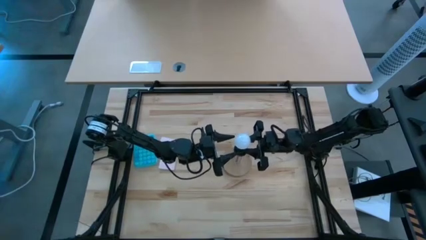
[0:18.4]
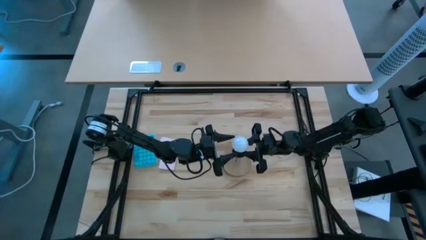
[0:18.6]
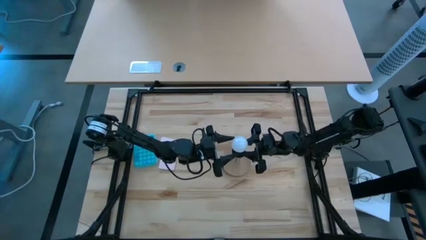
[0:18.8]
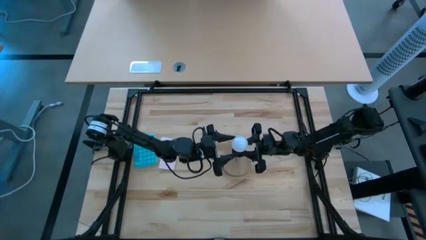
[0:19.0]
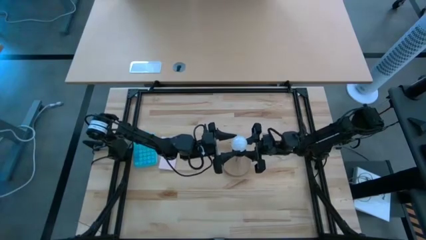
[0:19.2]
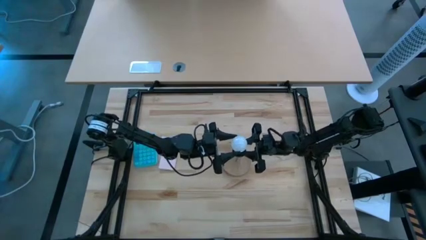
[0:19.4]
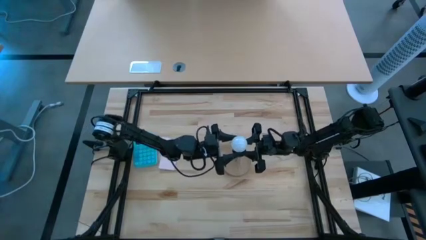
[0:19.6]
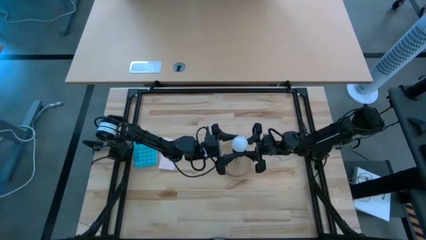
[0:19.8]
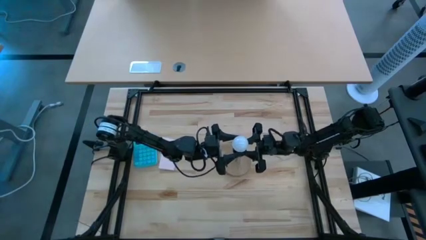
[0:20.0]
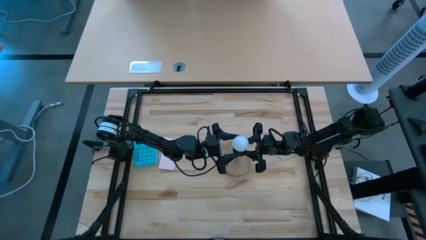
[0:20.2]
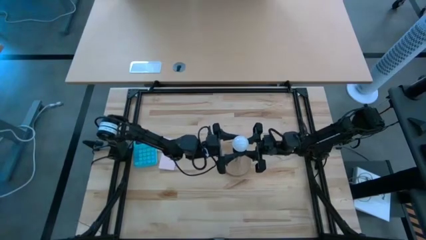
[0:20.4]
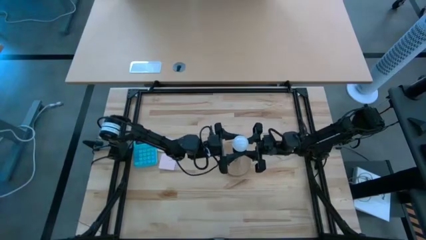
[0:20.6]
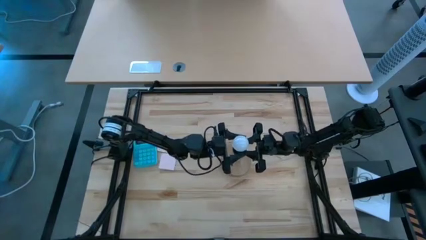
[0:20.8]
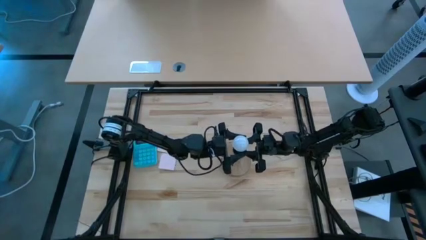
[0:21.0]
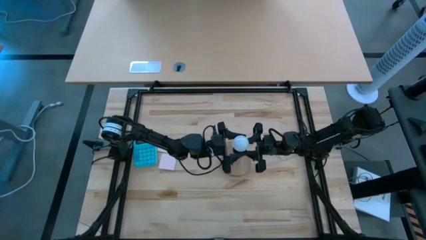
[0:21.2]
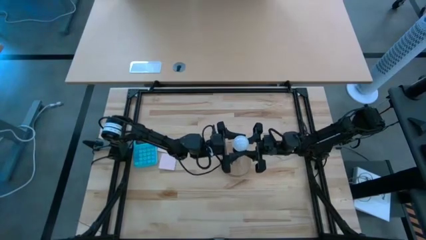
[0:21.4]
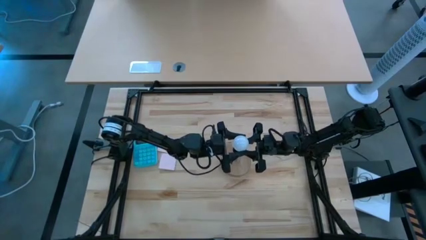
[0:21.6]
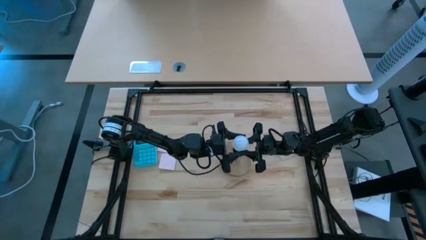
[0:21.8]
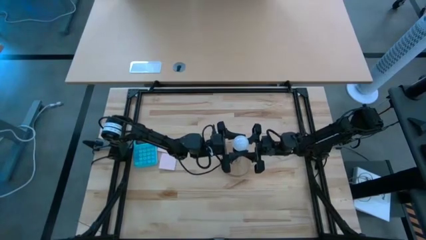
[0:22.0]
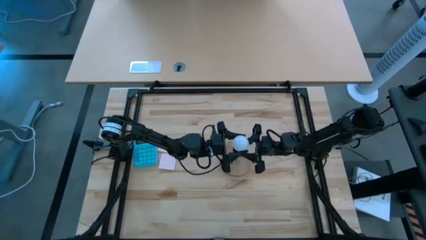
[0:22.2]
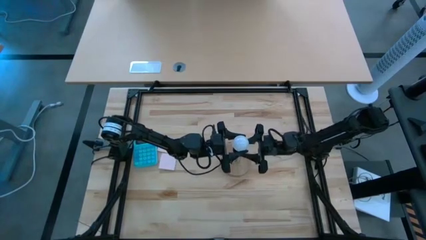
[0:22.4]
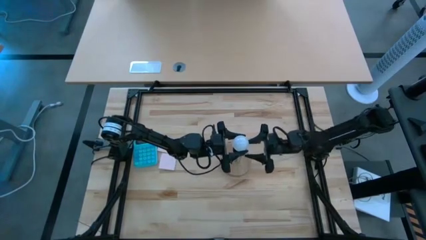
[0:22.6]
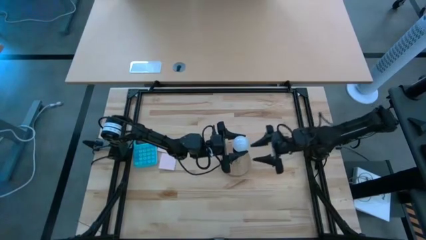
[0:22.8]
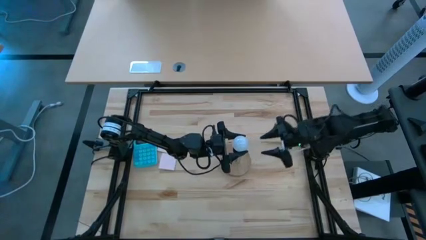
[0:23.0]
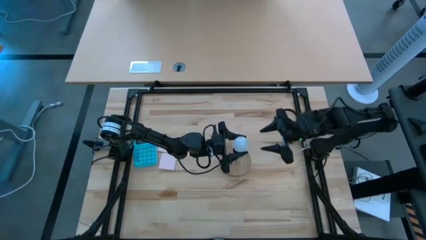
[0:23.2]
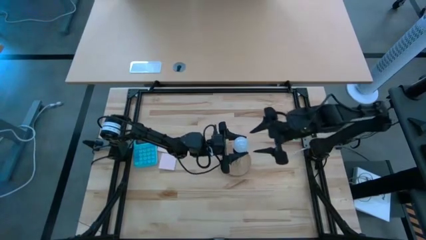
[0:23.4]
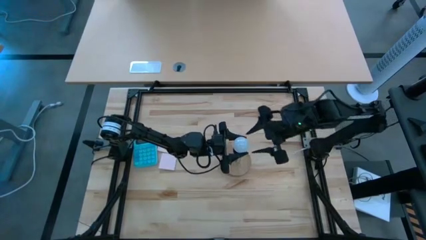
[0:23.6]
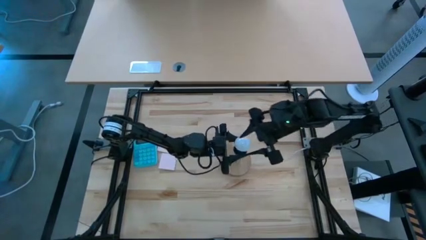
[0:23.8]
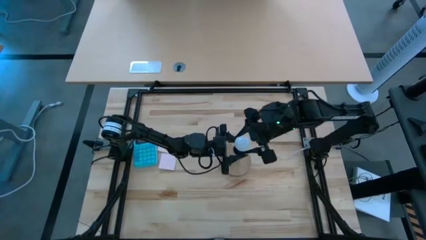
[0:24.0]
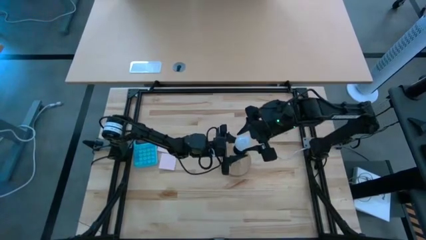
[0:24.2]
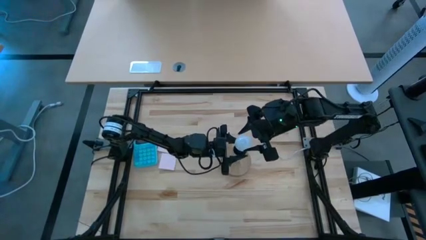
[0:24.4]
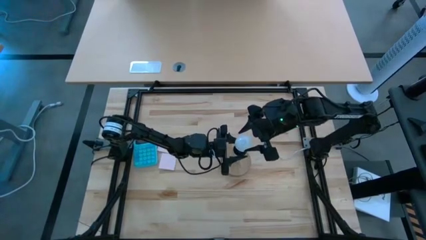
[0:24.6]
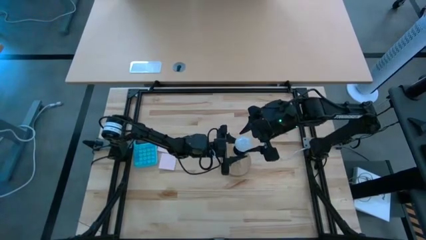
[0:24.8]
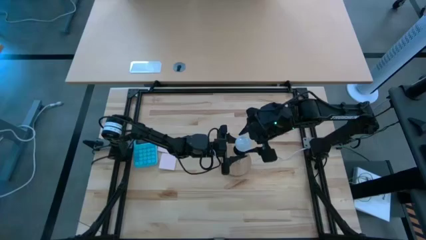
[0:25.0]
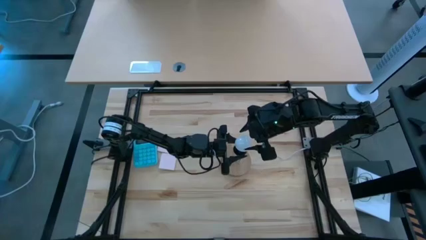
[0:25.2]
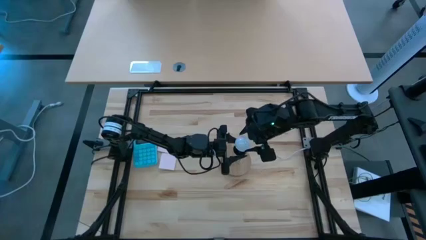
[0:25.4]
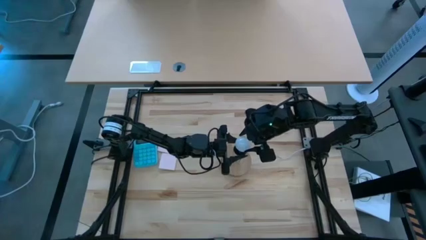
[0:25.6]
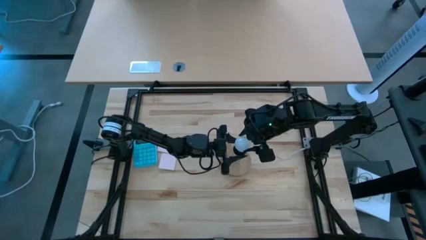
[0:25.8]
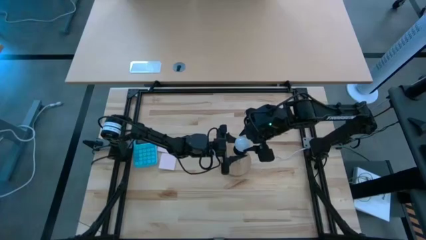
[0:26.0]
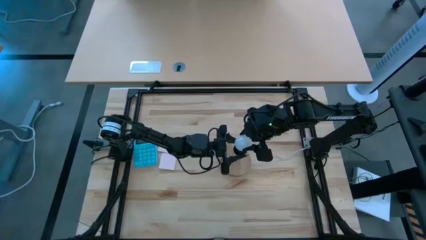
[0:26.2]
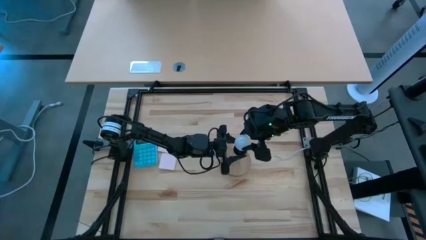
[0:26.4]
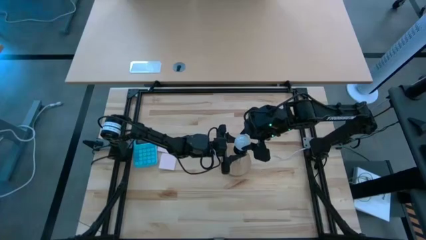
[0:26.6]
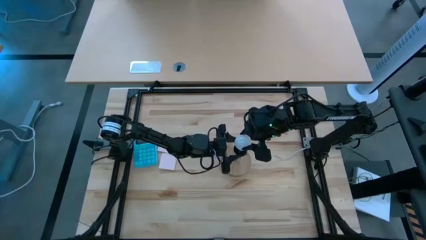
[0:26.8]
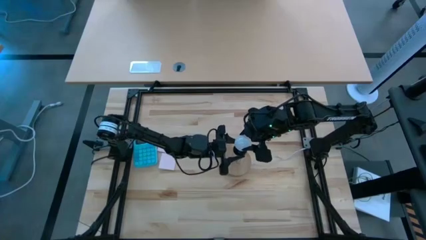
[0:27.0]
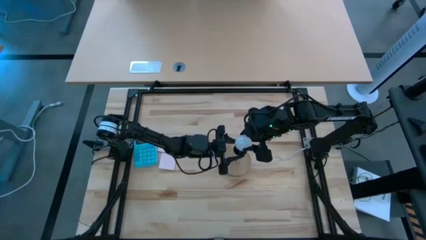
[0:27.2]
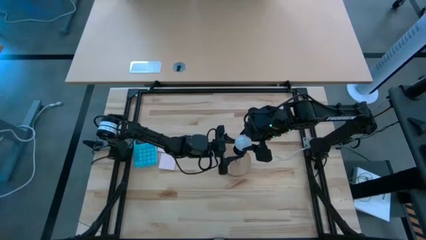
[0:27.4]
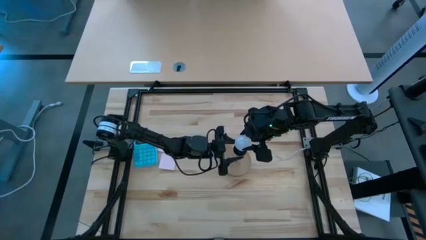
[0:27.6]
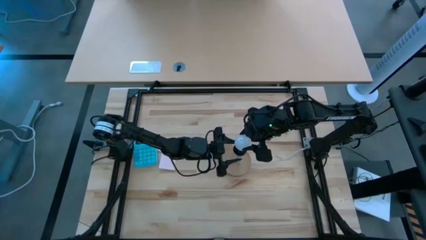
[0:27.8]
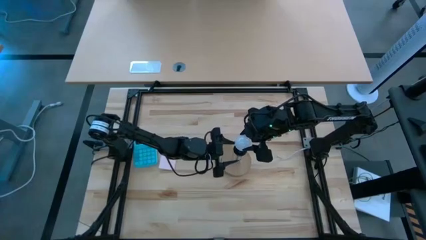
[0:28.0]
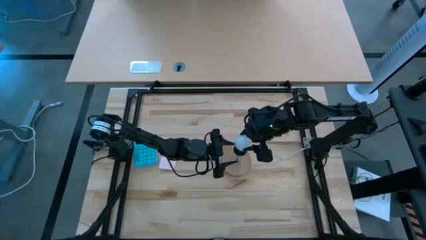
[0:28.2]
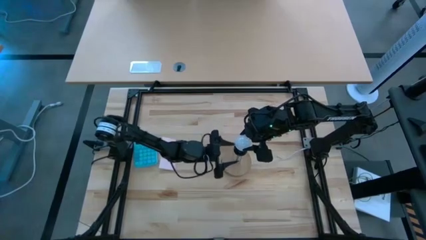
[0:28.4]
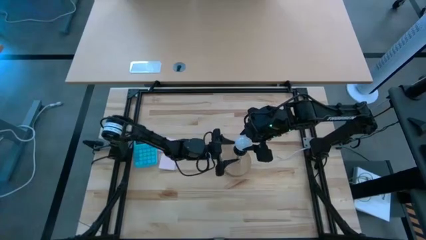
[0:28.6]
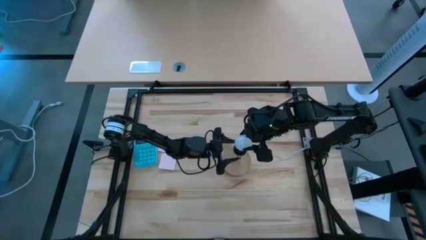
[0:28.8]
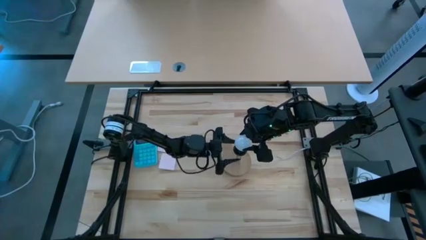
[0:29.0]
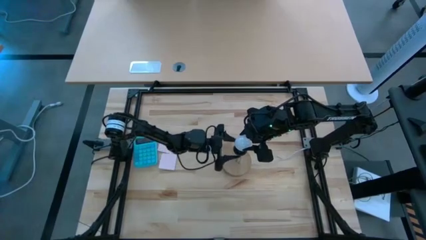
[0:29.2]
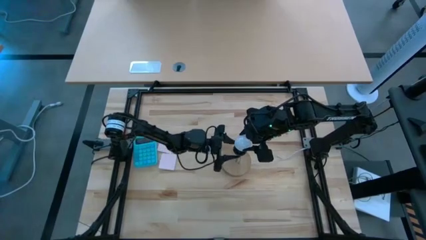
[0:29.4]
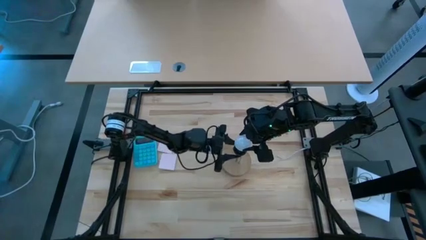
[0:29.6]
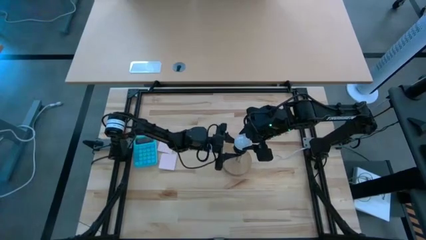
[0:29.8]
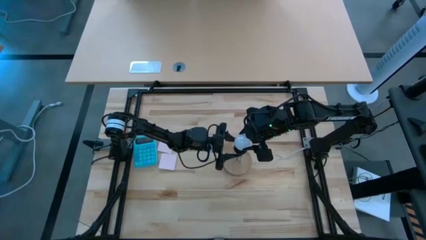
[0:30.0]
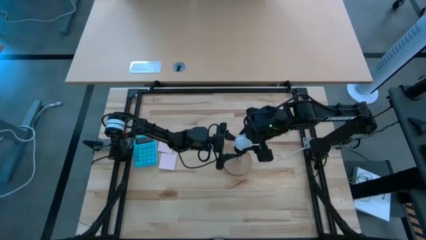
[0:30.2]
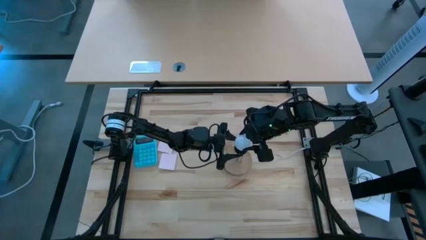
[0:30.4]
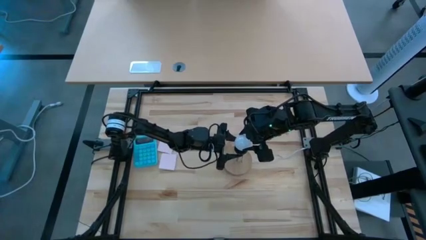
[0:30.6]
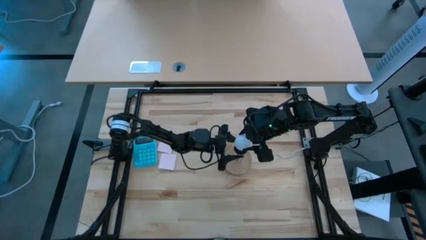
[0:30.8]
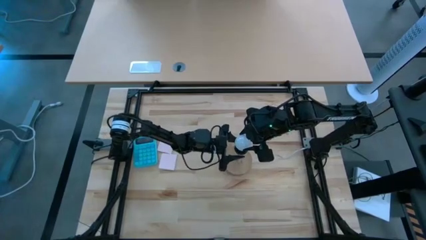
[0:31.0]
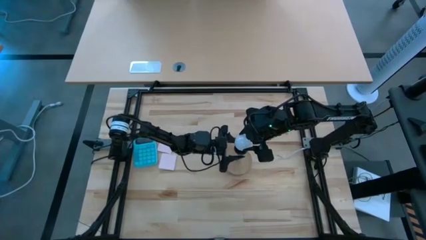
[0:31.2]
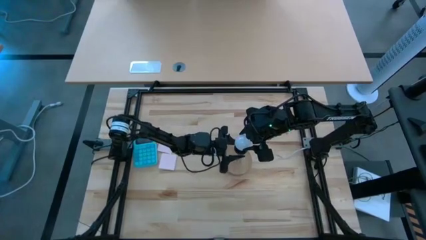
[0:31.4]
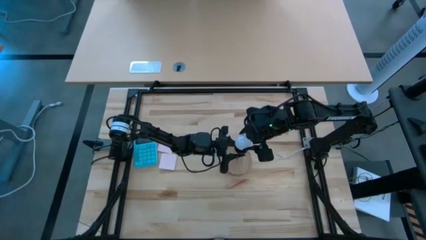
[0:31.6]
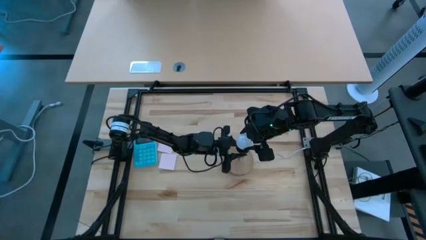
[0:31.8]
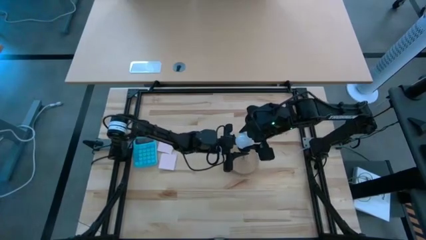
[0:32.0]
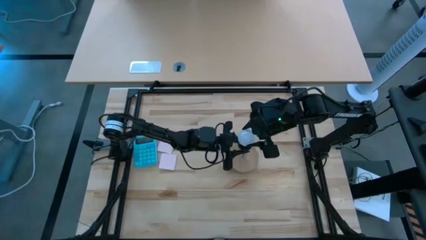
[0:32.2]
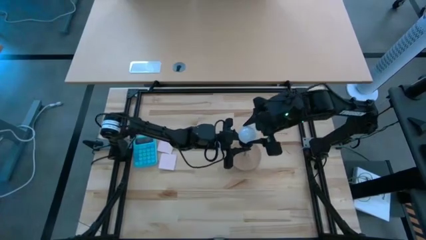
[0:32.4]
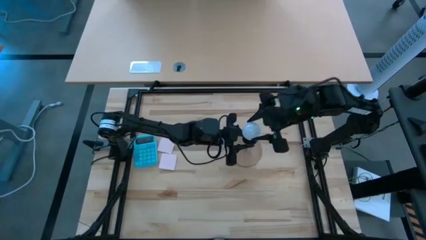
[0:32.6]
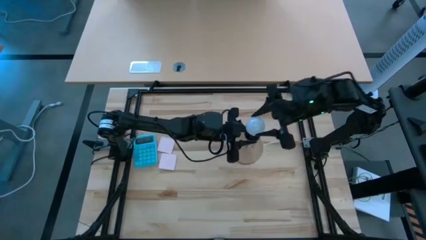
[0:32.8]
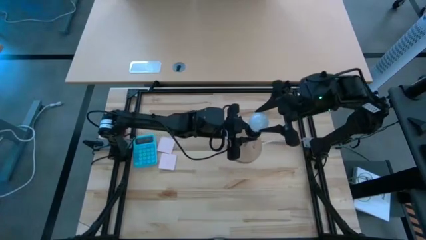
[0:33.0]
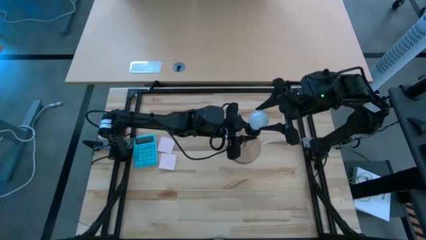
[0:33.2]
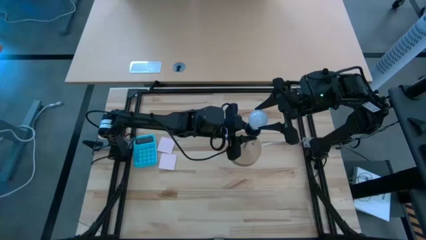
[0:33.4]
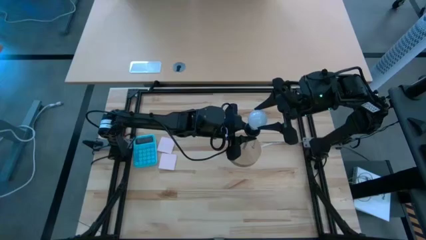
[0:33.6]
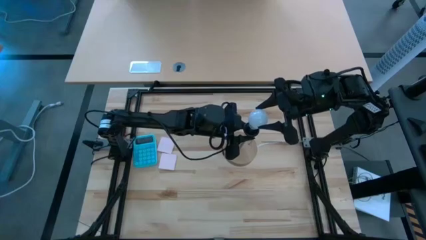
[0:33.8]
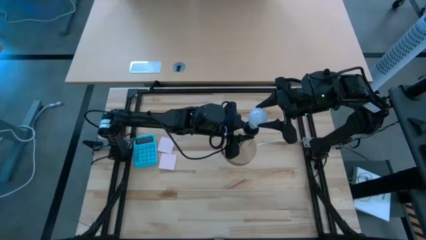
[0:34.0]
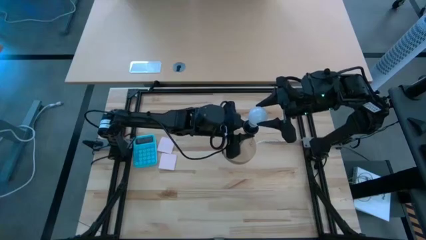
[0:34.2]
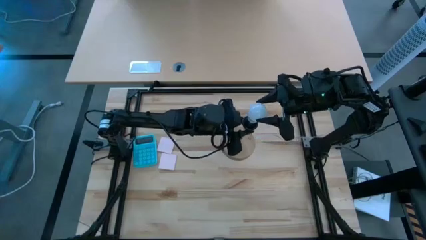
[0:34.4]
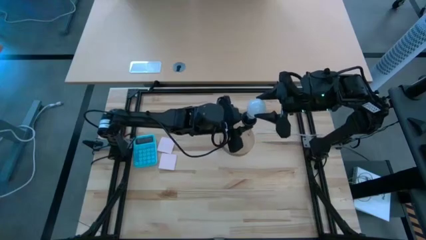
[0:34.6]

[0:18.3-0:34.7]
Task: Screw lightbulb
Insert the lightbulb into the lamp
